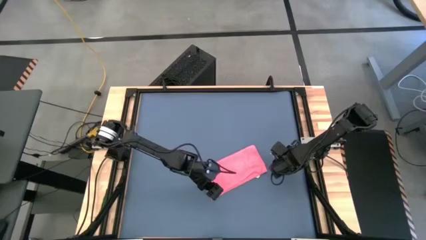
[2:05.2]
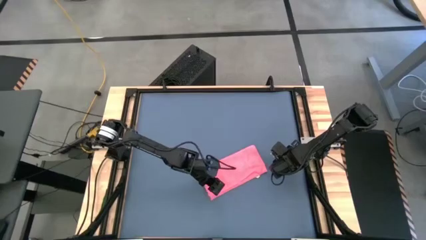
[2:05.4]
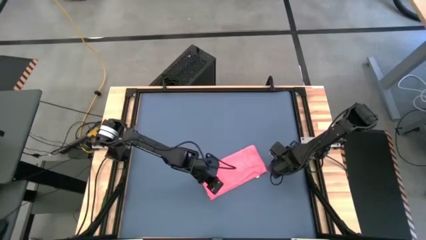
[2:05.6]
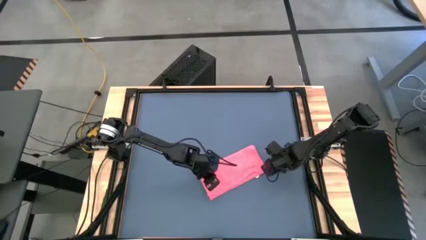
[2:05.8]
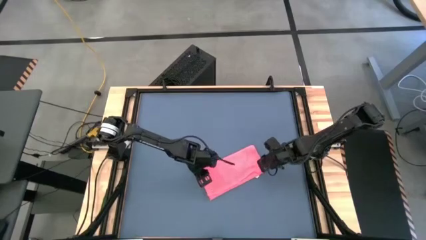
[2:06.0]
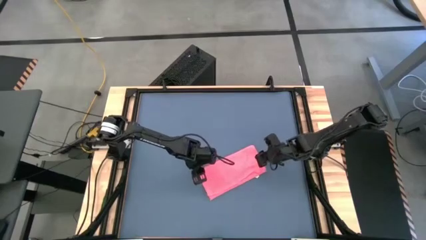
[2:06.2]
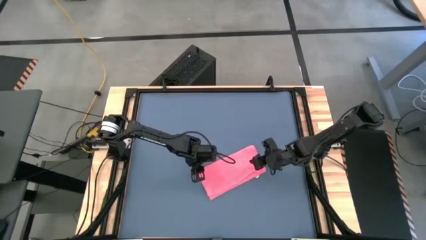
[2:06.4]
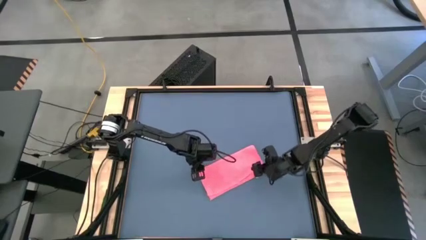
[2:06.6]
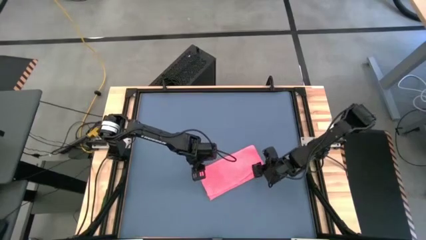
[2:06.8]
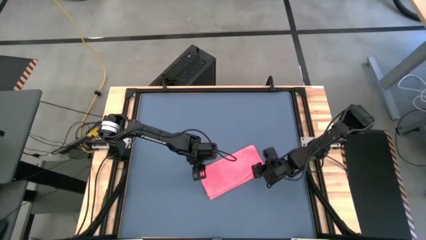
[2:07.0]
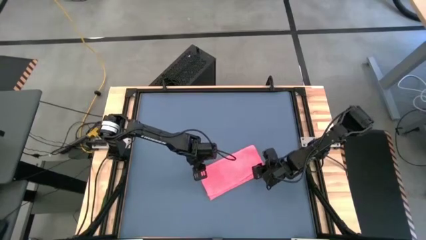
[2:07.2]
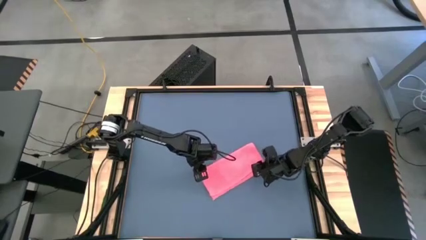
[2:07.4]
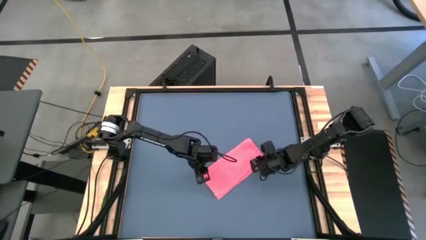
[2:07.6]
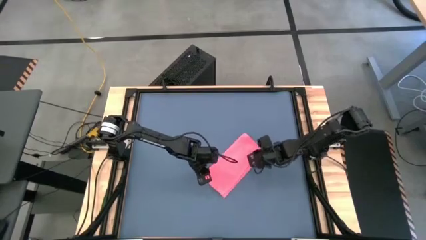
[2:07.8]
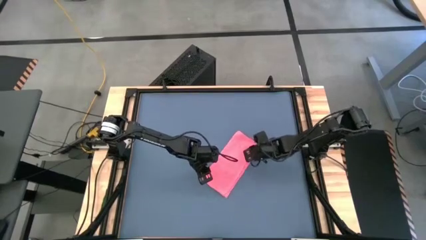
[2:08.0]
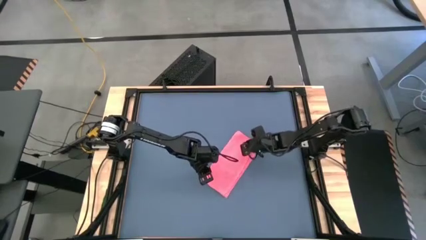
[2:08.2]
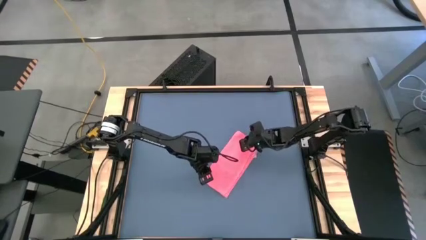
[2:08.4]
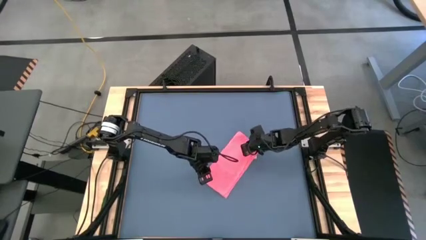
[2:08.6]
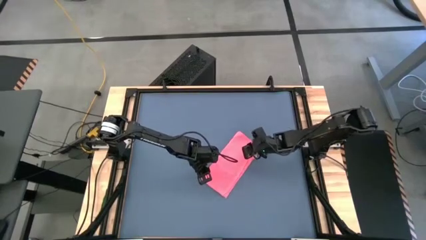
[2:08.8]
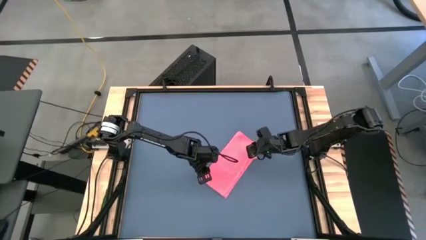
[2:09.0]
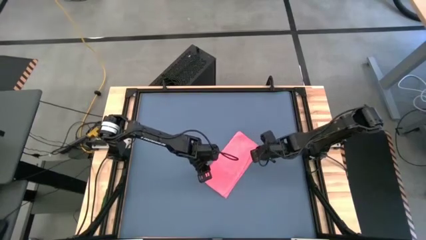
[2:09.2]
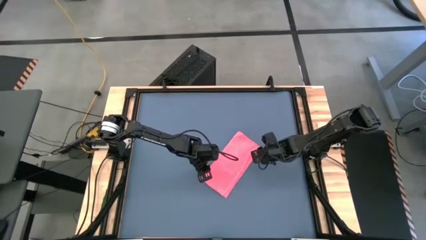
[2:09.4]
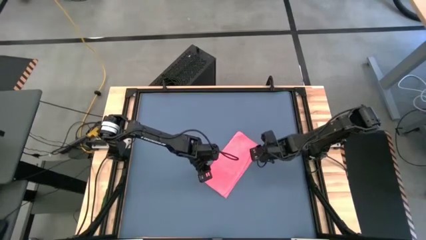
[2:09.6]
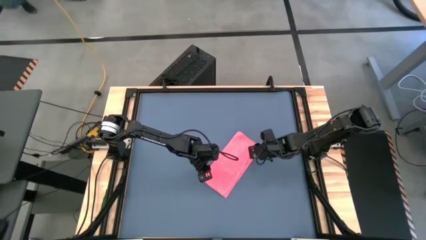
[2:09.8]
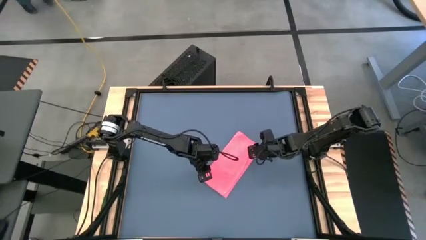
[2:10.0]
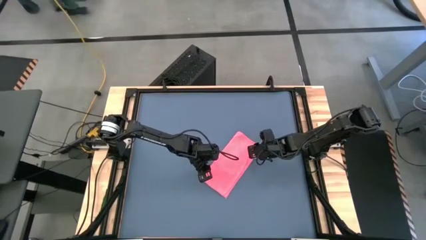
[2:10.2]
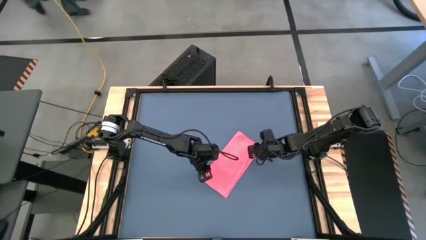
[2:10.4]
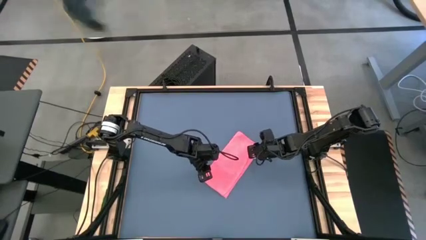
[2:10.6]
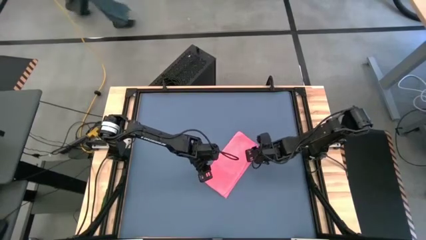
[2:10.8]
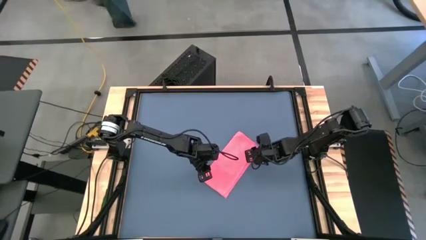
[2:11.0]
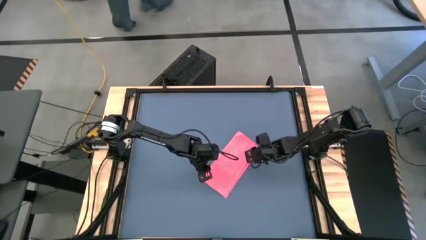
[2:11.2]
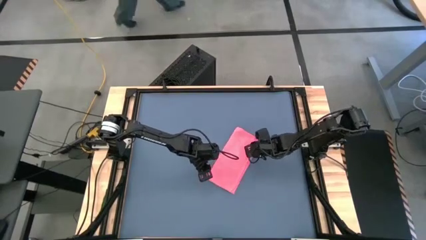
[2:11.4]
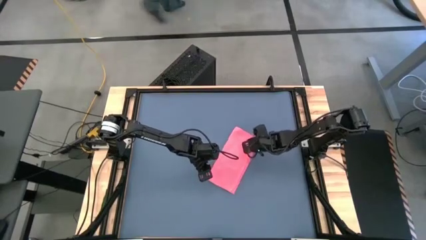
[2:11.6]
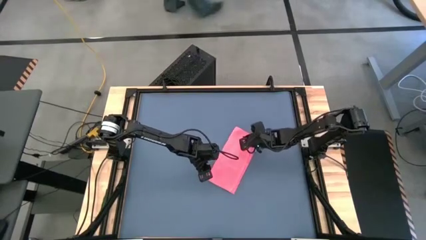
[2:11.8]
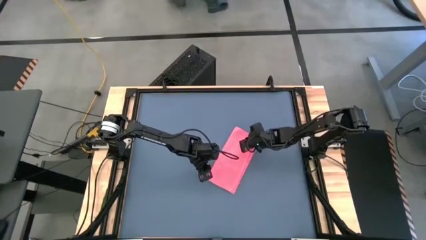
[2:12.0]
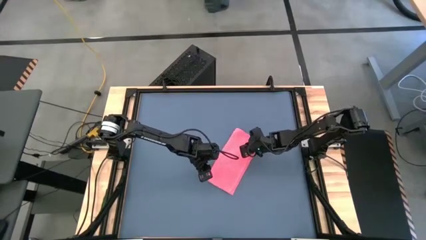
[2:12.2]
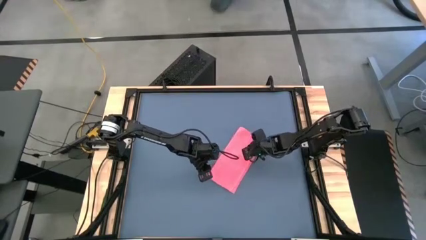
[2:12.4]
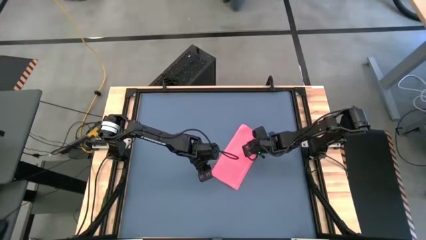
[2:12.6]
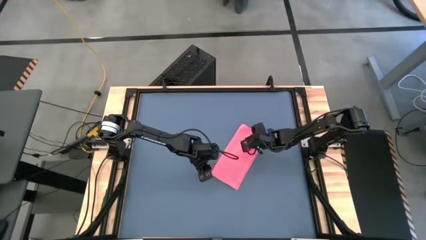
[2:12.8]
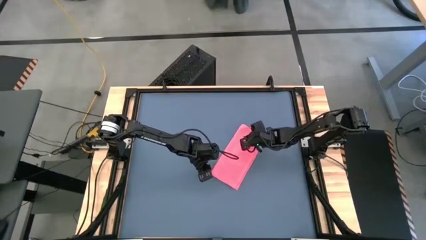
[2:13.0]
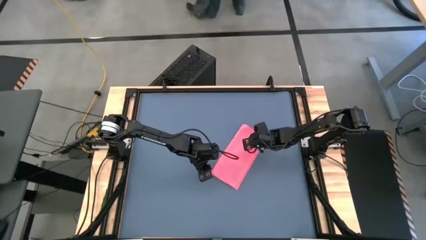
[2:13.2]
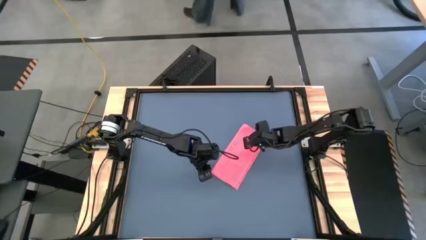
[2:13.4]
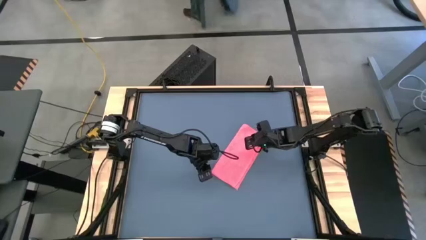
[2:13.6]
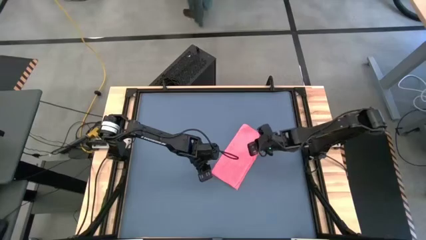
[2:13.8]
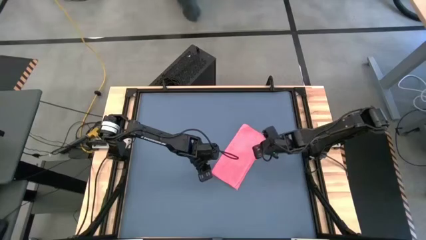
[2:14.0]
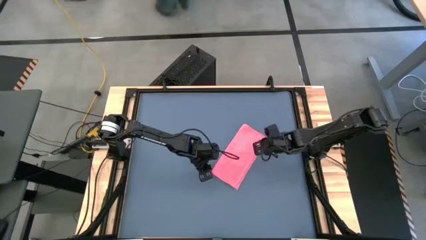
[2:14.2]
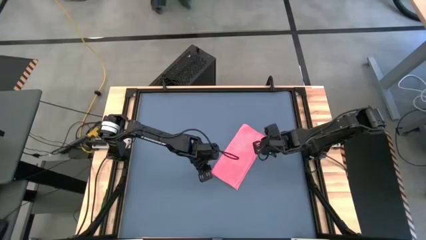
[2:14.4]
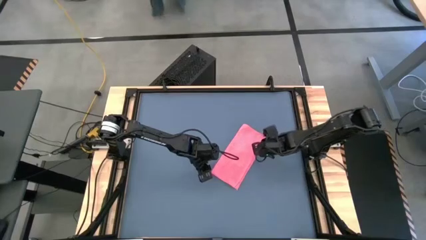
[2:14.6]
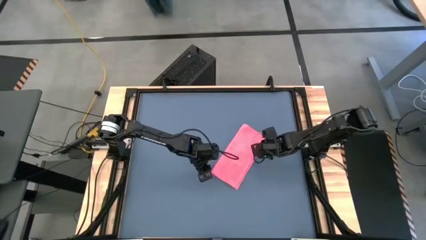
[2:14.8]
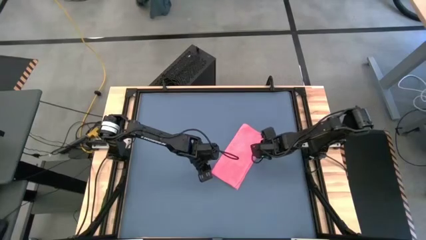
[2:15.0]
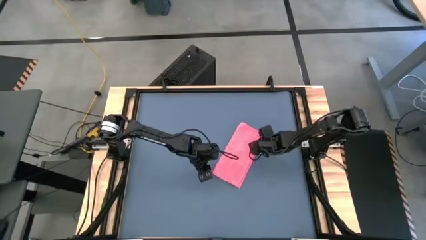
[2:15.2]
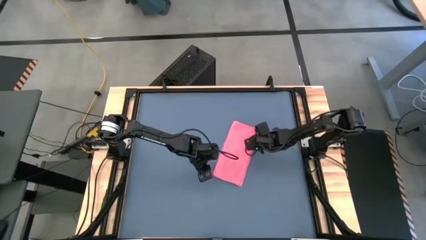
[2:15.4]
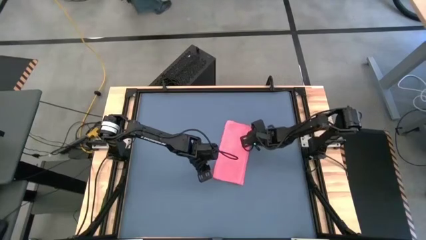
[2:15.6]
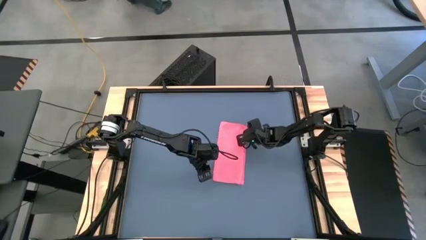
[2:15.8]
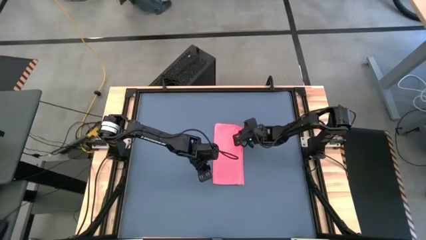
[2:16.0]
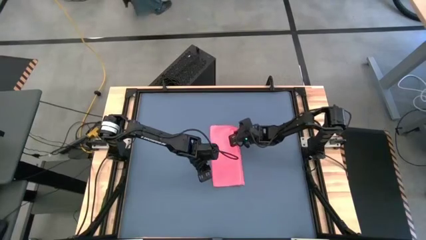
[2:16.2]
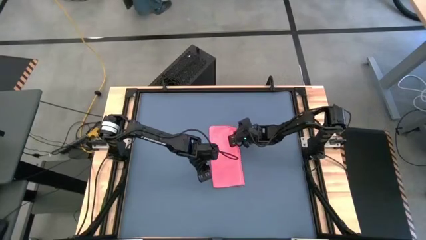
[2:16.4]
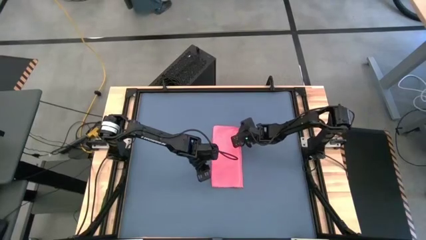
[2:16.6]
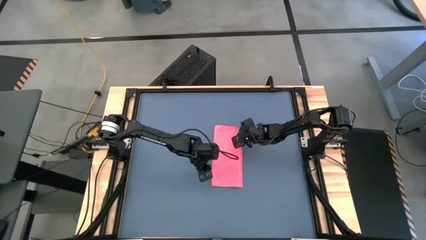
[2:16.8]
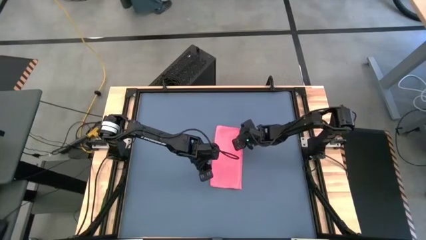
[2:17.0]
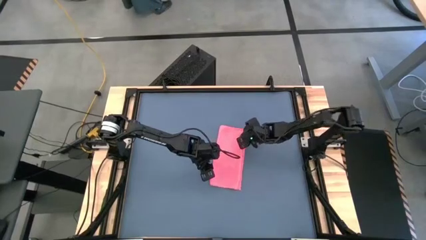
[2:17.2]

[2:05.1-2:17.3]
Task: Roll towel
Adjust the pink towel

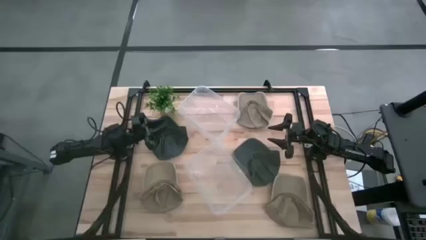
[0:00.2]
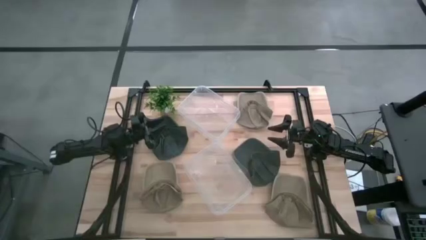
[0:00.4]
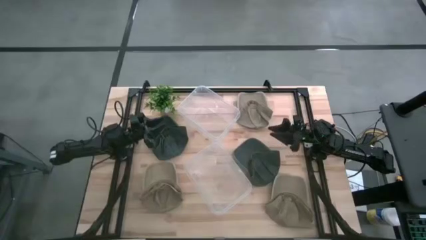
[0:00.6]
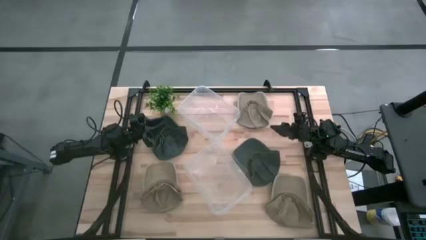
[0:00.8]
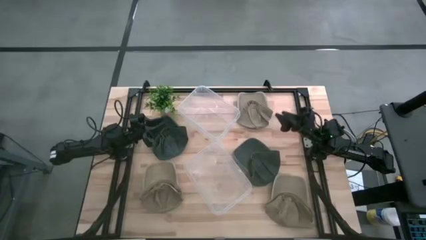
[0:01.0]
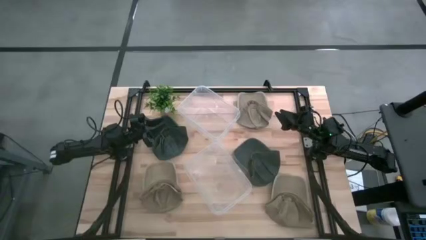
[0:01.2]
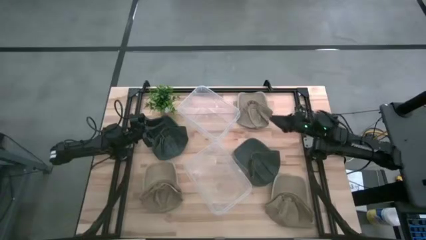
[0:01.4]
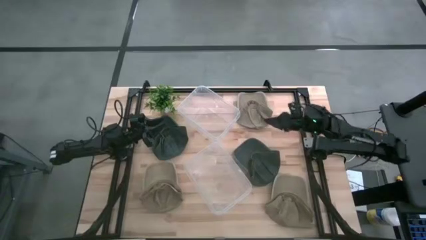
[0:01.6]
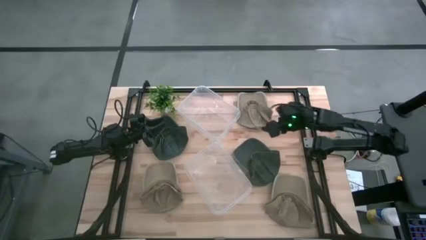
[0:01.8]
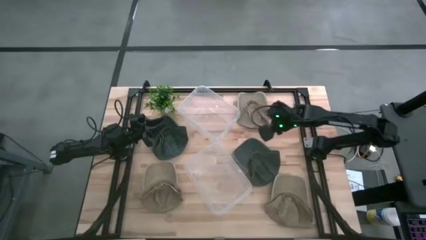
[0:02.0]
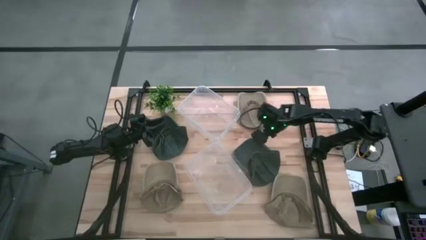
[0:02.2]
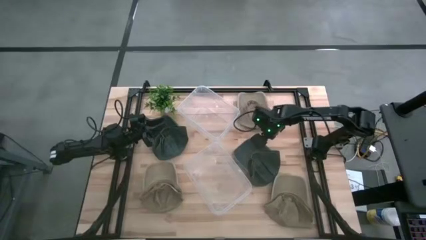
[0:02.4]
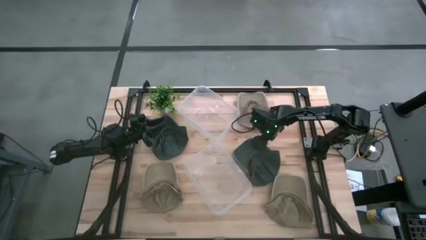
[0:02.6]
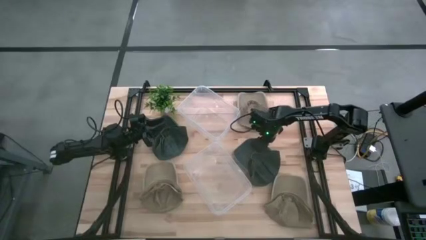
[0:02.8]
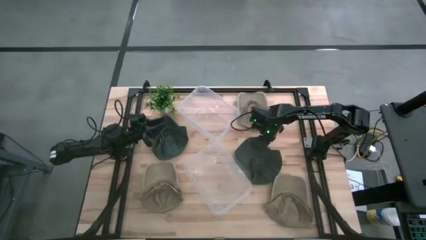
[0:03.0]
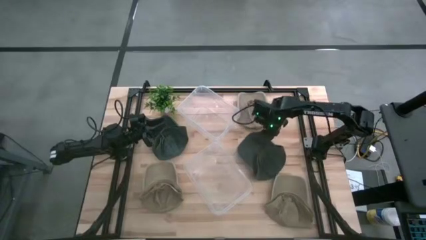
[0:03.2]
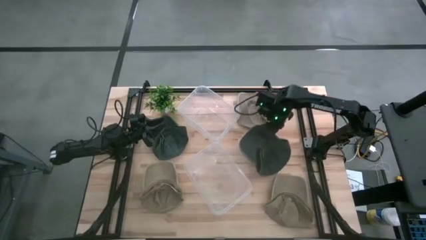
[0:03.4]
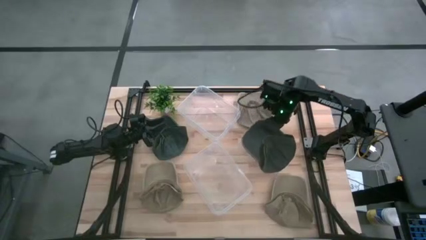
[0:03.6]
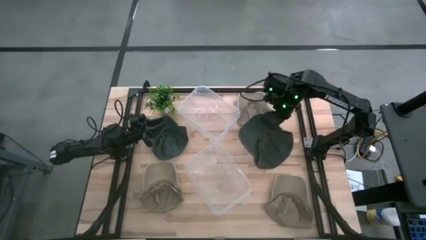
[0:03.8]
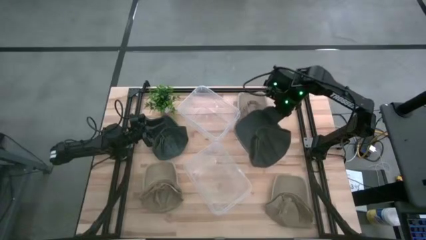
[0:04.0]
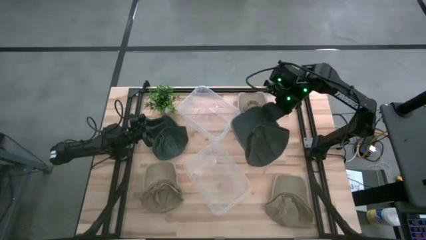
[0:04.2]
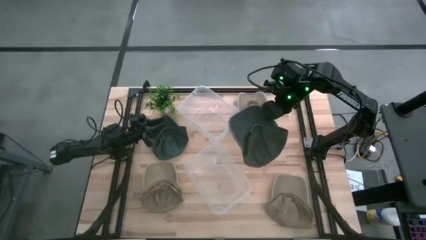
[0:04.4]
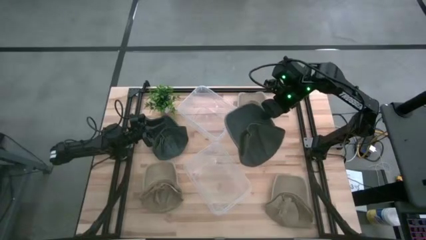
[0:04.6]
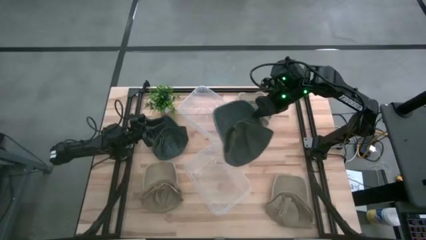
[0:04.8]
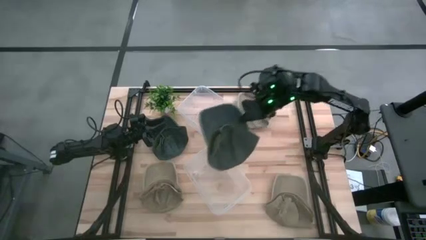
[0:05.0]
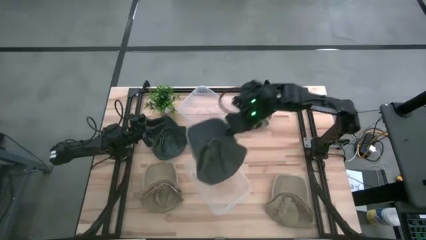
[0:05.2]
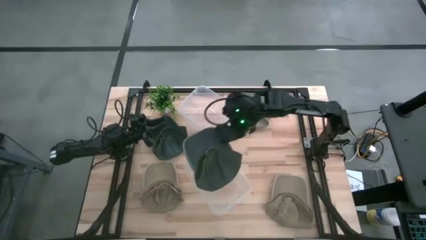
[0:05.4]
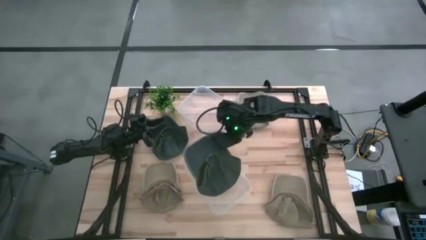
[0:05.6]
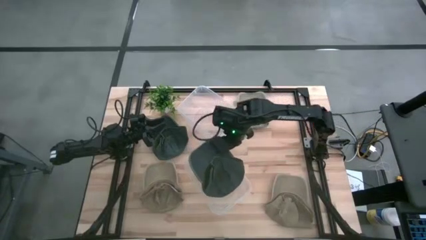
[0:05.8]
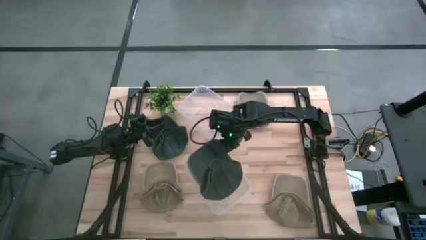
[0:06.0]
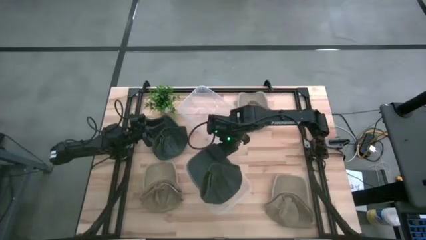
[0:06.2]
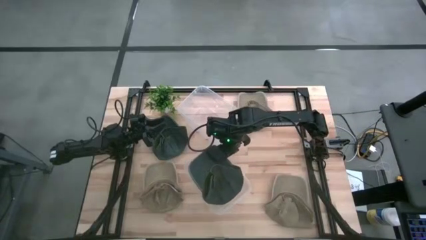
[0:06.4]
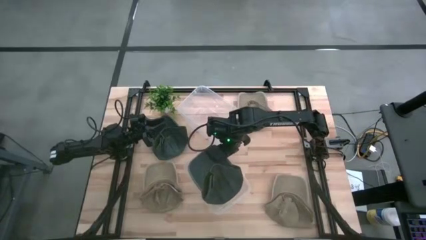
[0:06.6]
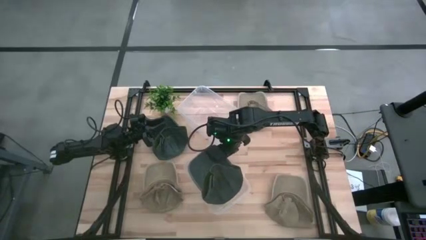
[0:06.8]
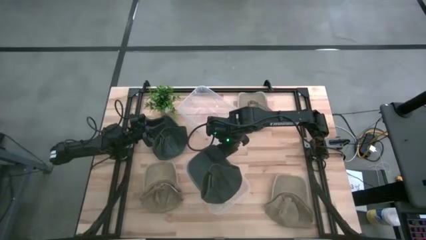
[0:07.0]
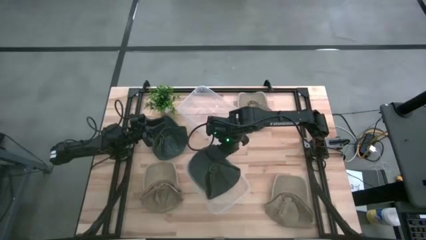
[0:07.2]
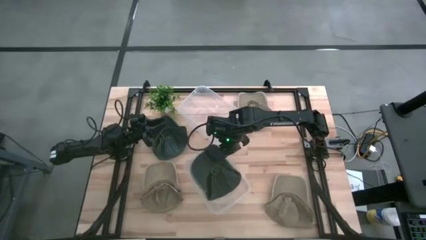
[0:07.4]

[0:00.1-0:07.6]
Task: Pick & Place hat
Put the right black cap into the bottom transparent bin
